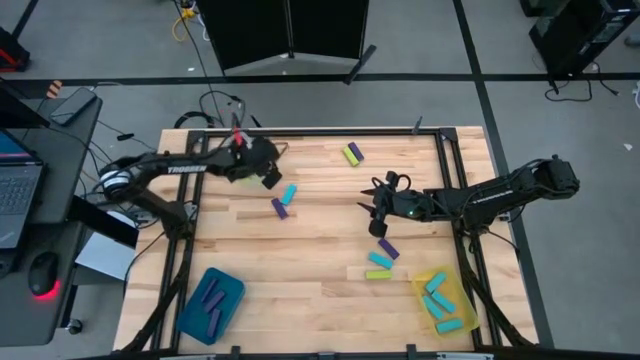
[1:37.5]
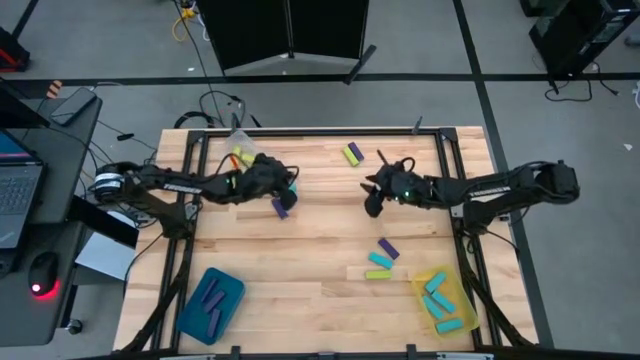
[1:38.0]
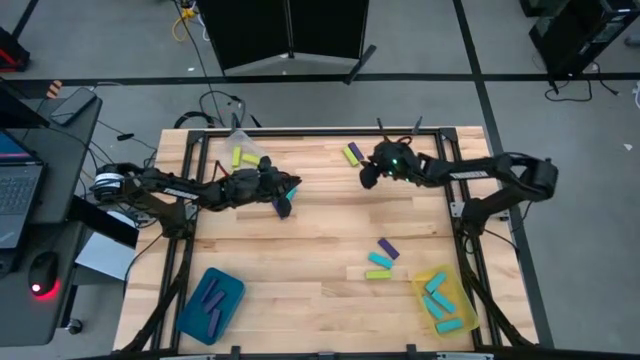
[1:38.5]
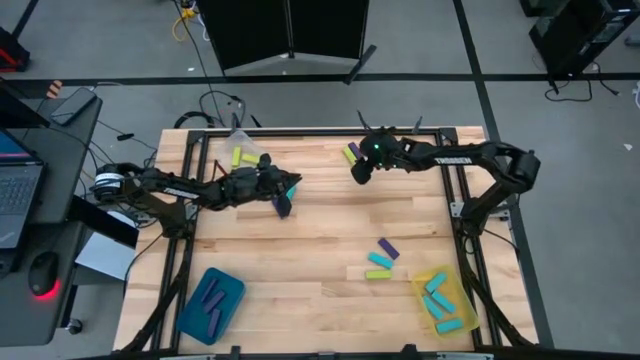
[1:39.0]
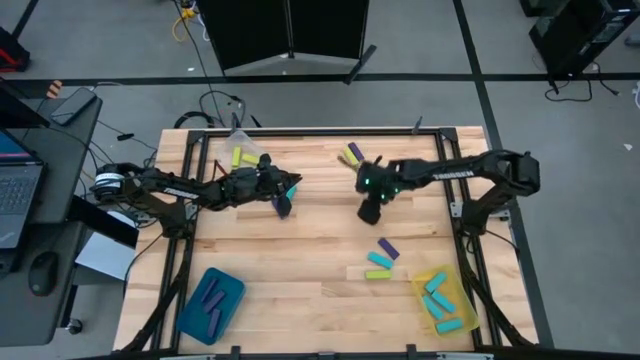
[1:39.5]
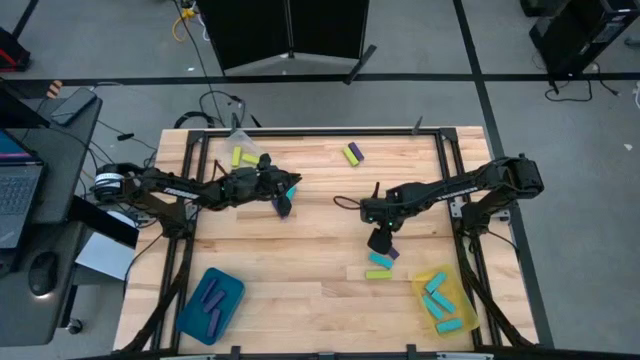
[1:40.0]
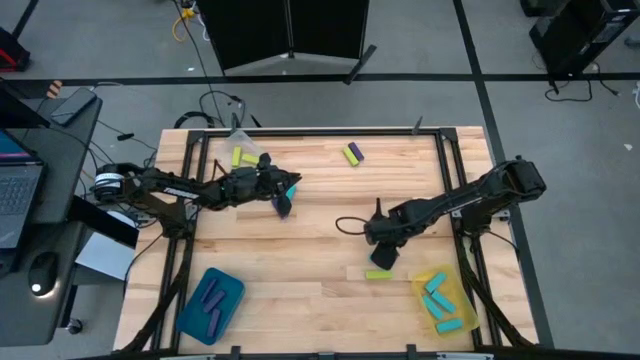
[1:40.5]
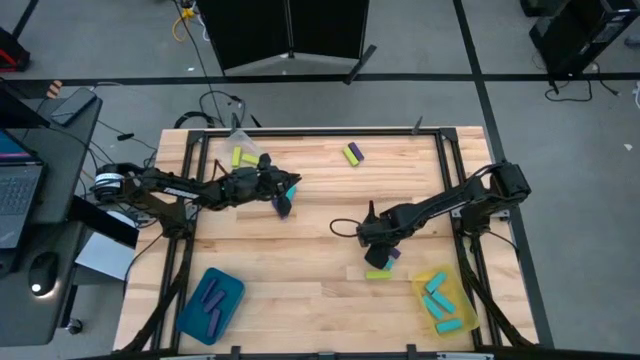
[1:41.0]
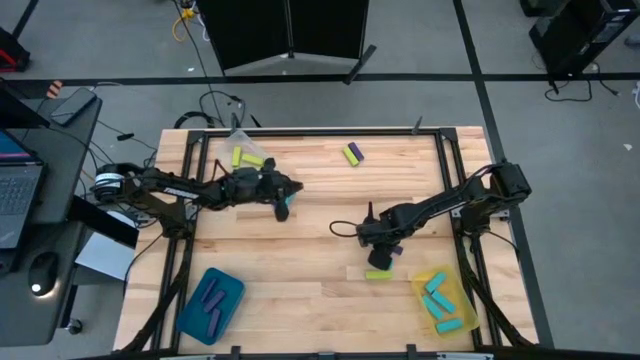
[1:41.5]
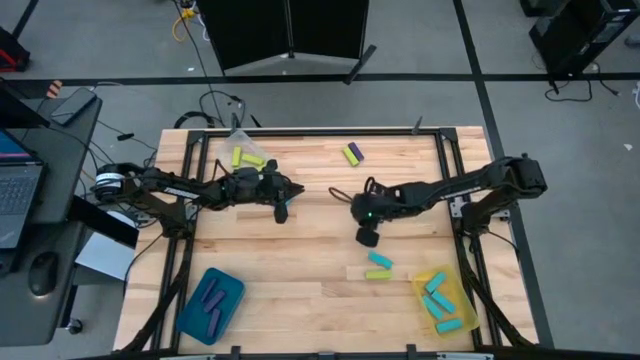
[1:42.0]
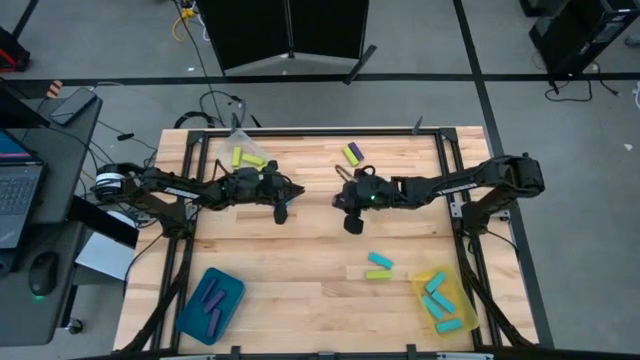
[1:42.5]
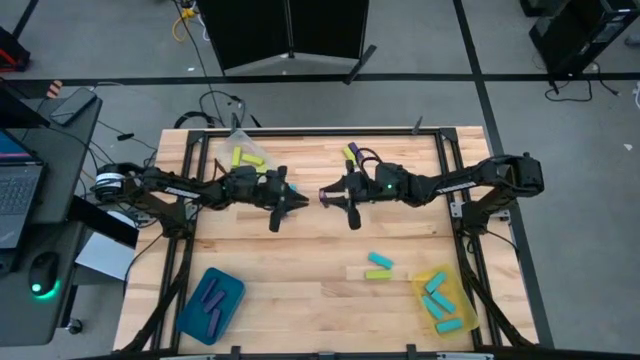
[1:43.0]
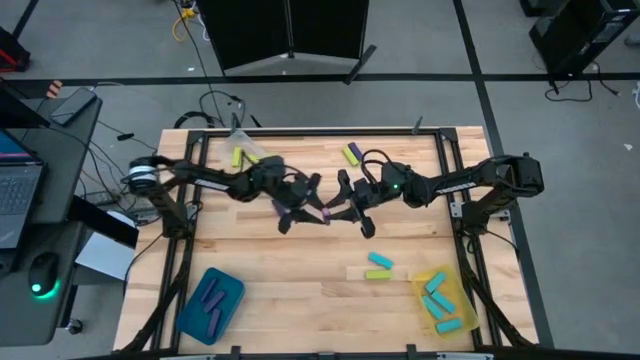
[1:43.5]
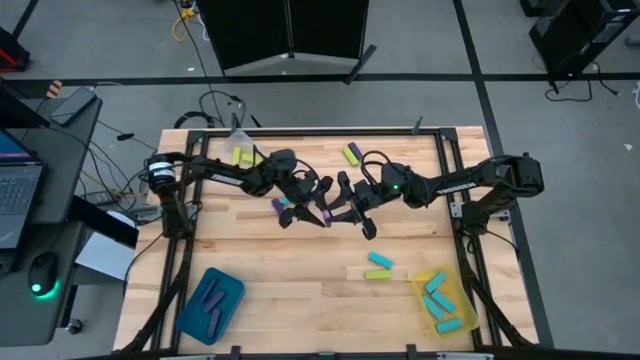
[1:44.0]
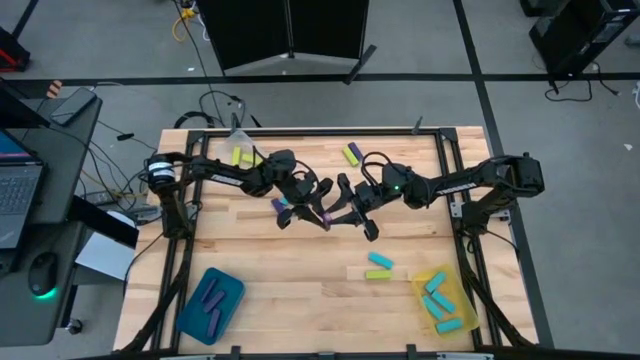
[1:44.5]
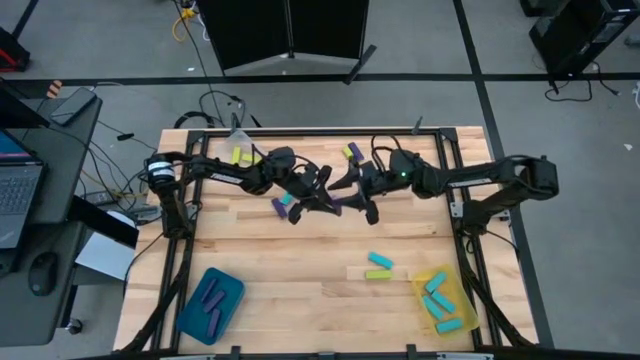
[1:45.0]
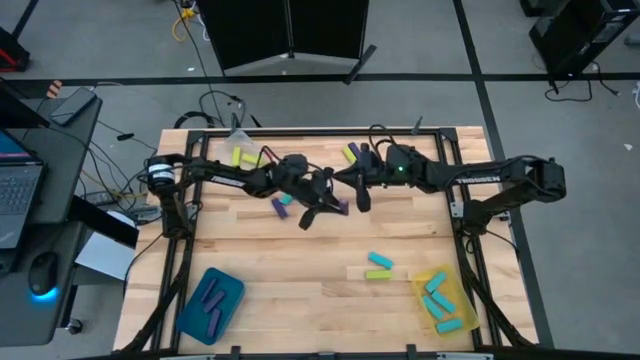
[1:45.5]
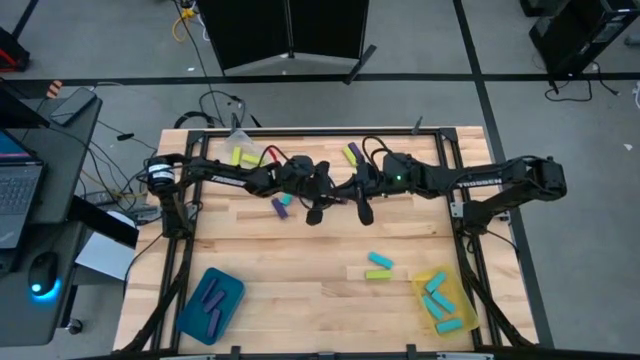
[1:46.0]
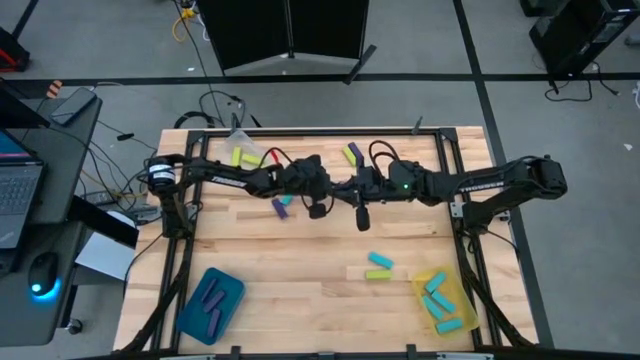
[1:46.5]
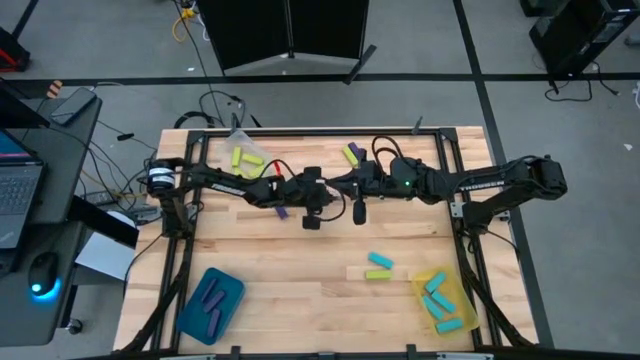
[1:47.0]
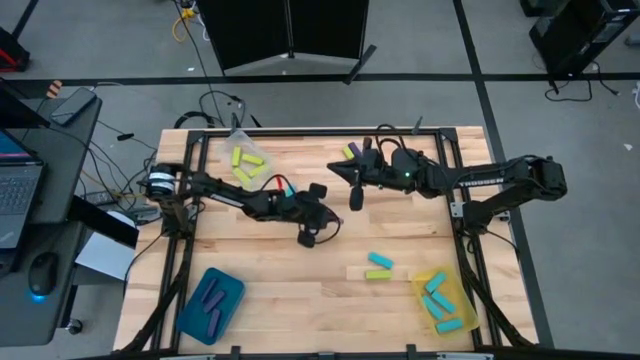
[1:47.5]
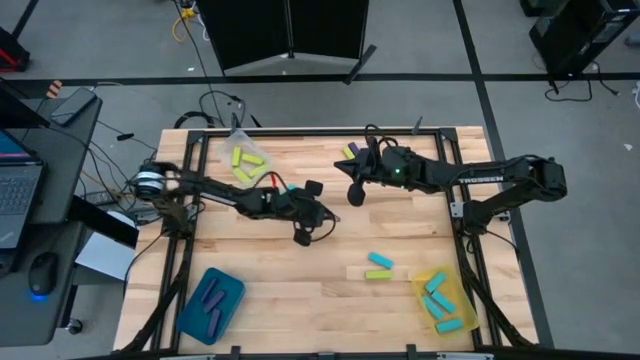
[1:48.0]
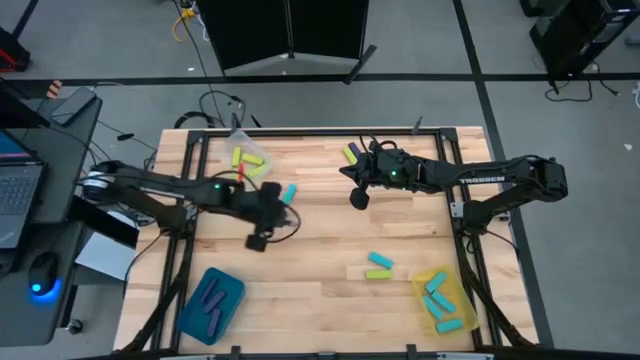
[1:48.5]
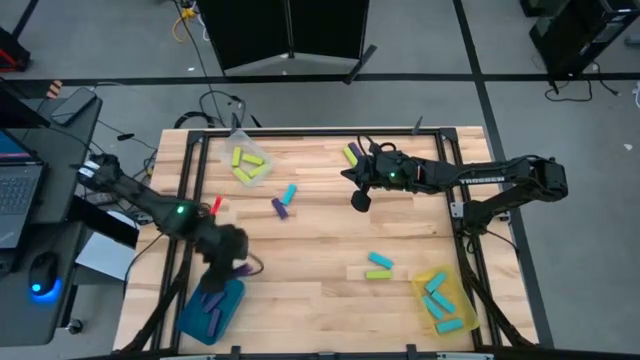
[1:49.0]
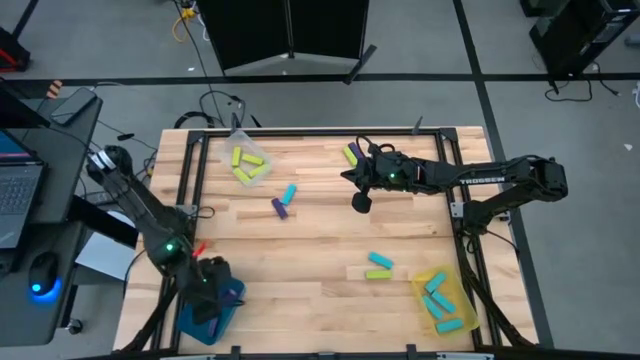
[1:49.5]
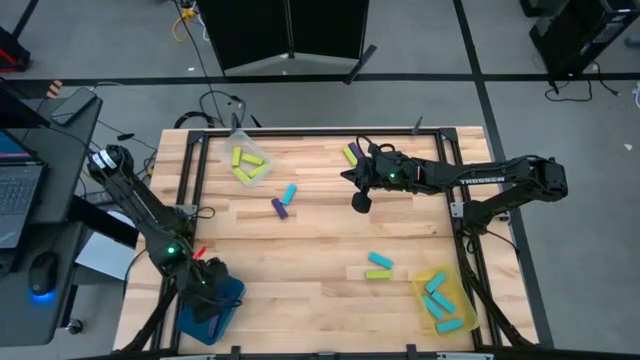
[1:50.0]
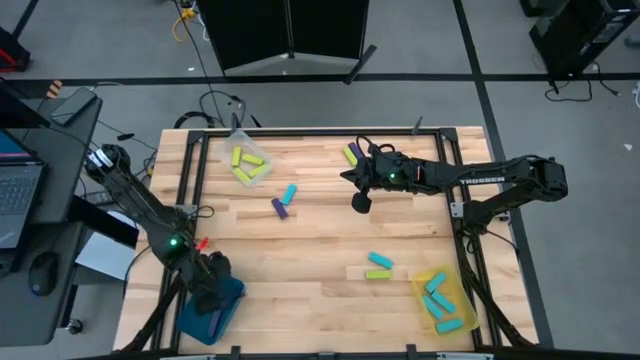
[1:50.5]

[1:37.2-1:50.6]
Task: Sort blocks
Put the purple block into the blue bin

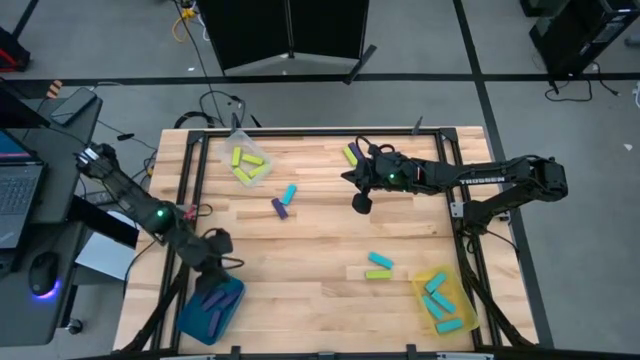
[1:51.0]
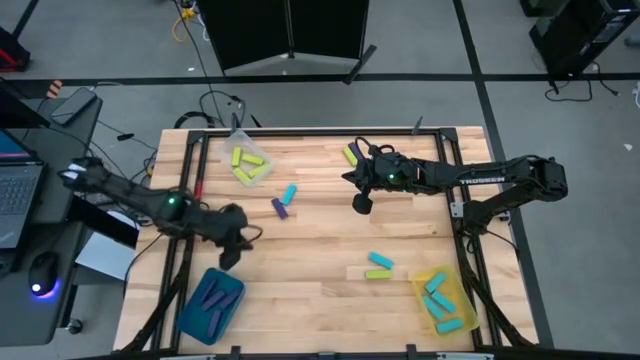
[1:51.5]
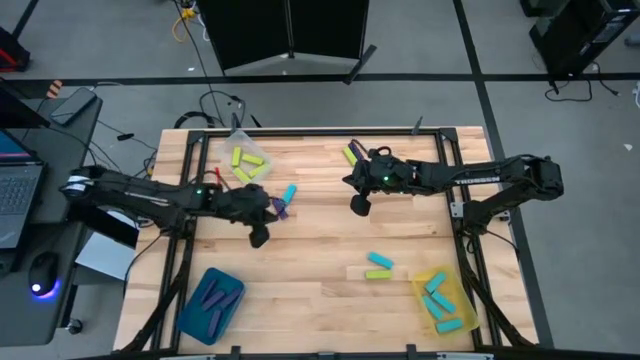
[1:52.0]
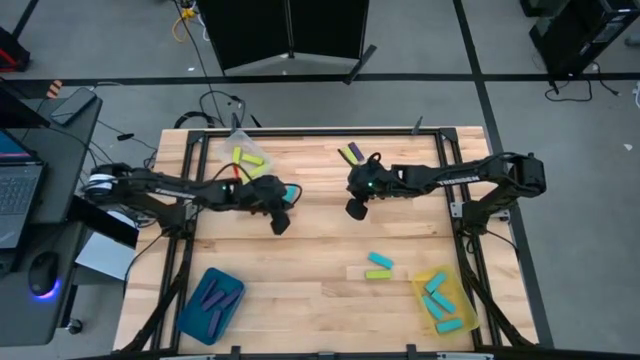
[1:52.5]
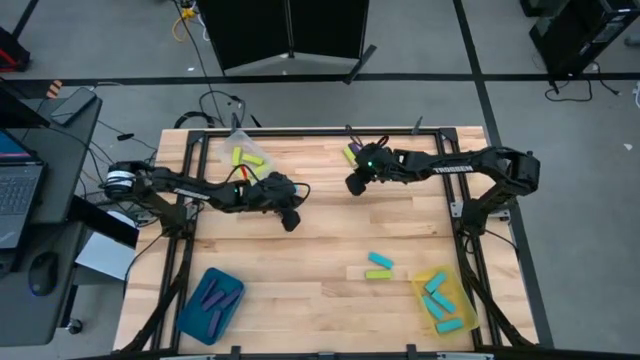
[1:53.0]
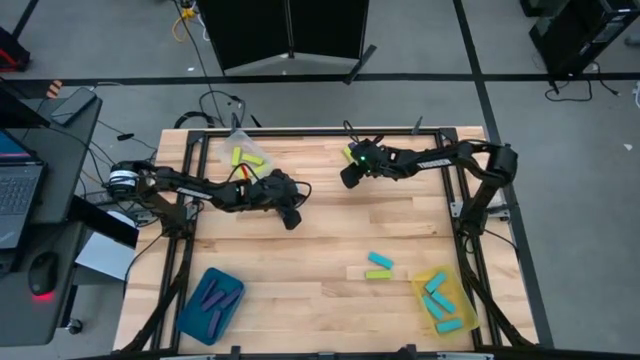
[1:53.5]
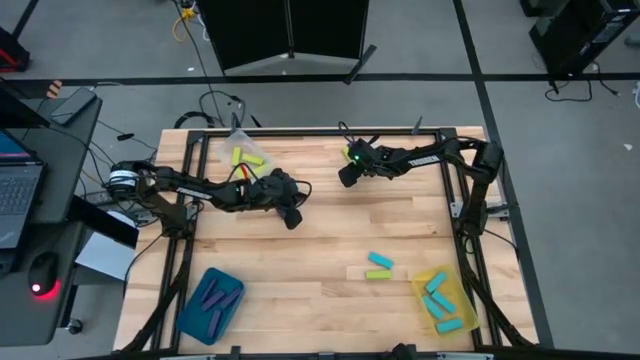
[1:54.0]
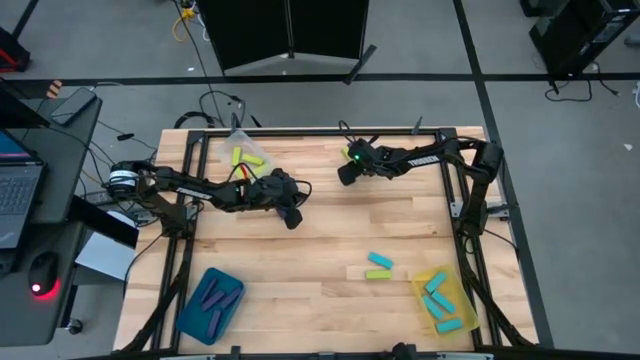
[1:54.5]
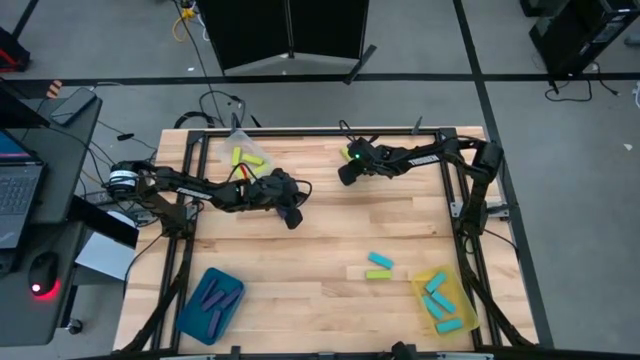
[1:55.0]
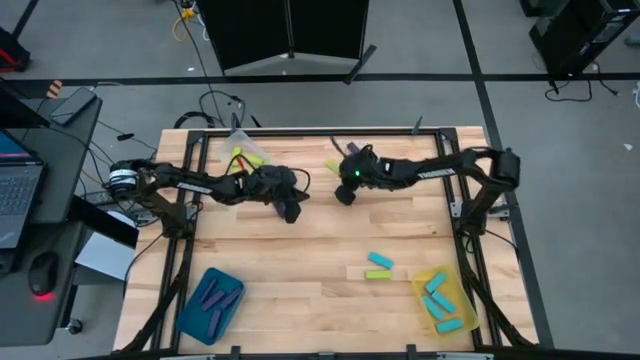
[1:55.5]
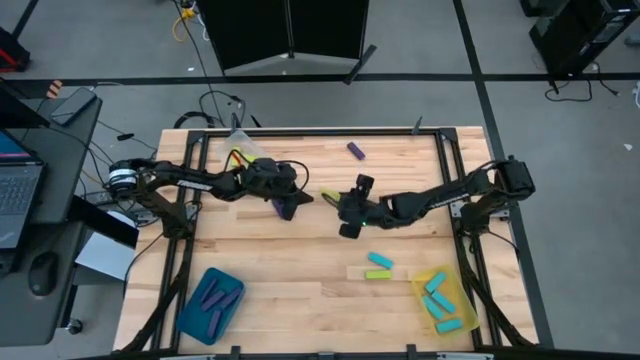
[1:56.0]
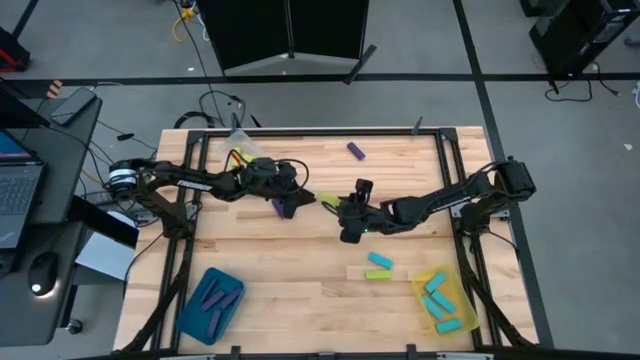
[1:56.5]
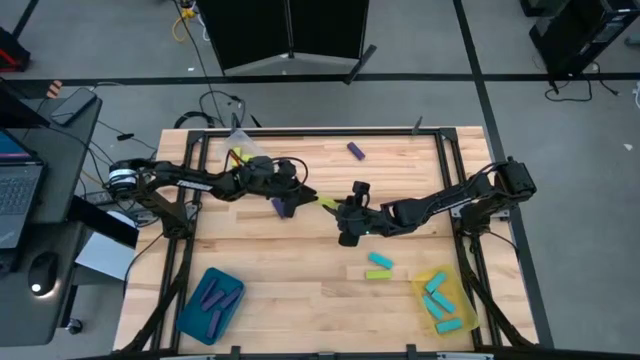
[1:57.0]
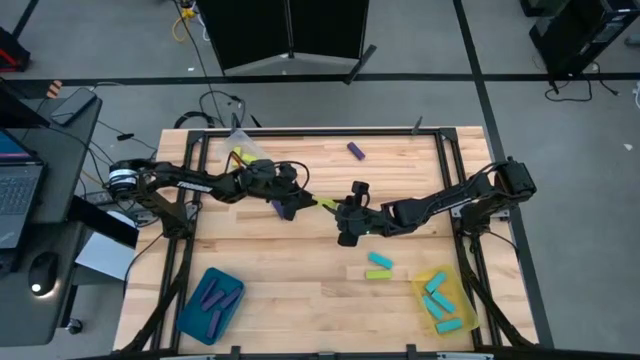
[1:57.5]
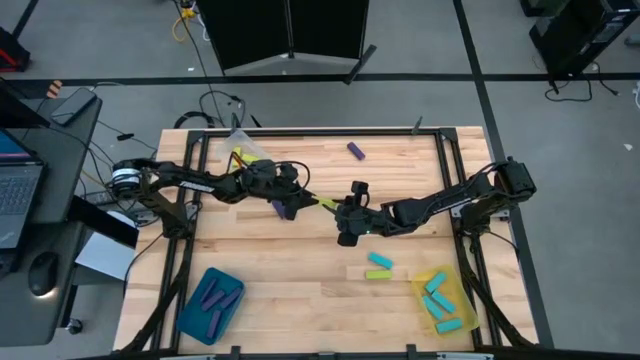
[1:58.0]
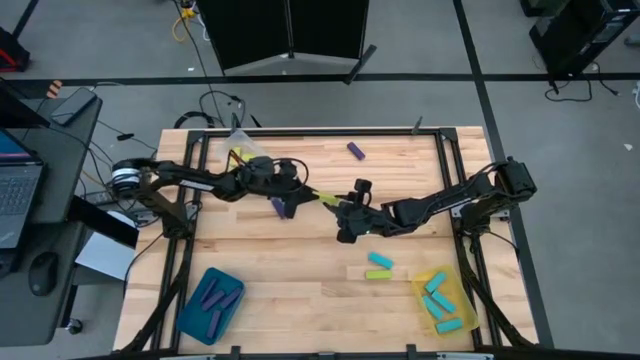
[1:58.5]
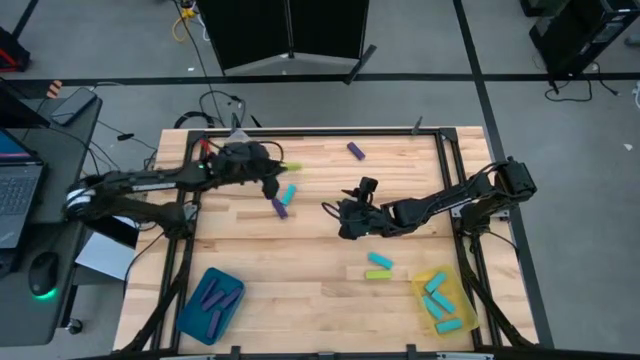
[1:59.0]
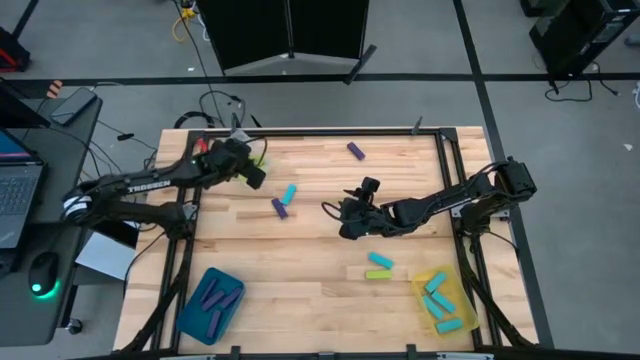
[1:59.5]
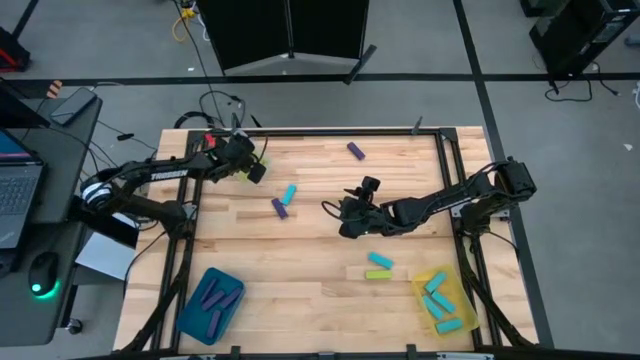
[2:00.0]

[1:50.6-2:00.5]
Put the green block into the transparent bin
